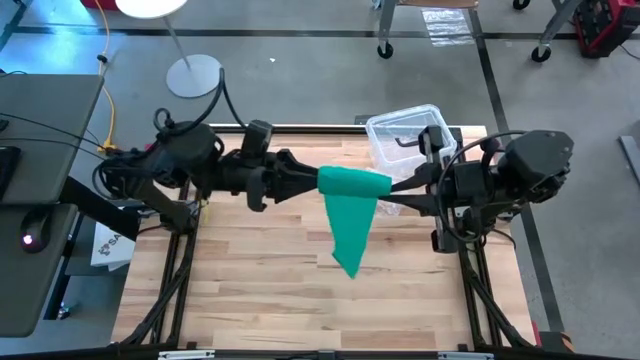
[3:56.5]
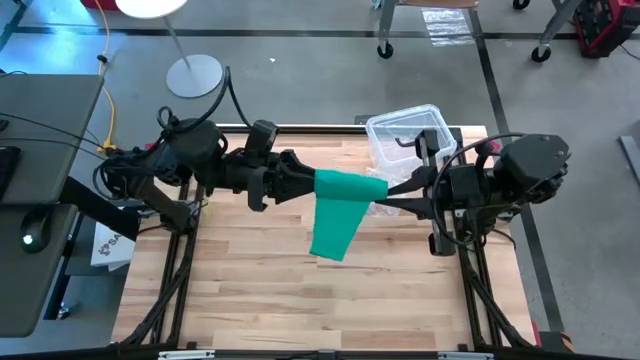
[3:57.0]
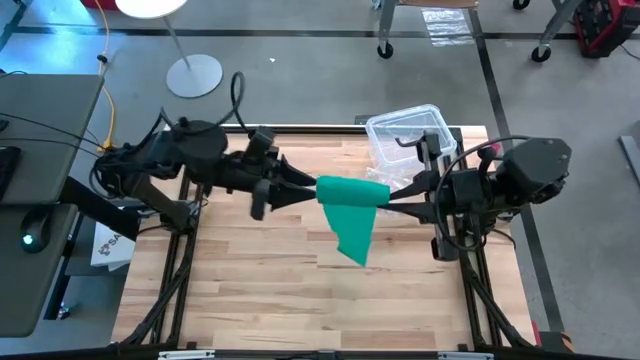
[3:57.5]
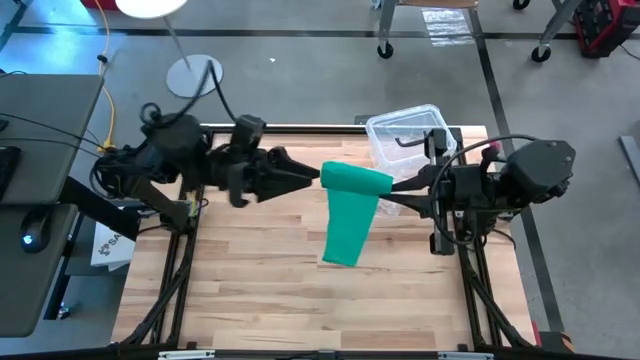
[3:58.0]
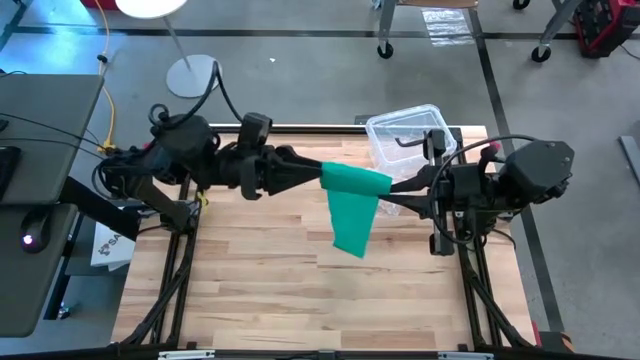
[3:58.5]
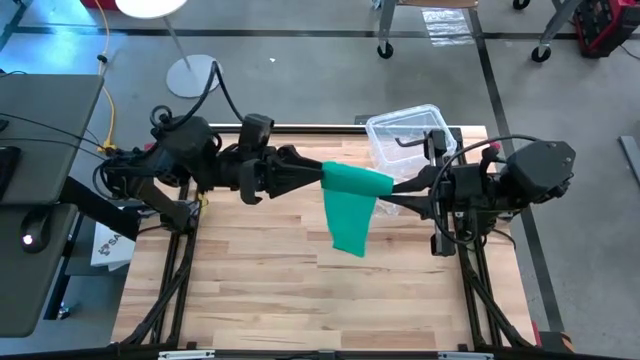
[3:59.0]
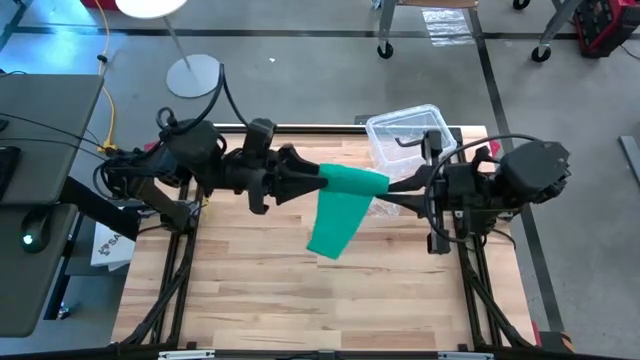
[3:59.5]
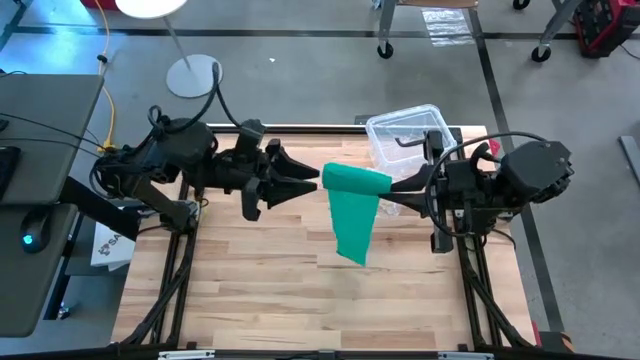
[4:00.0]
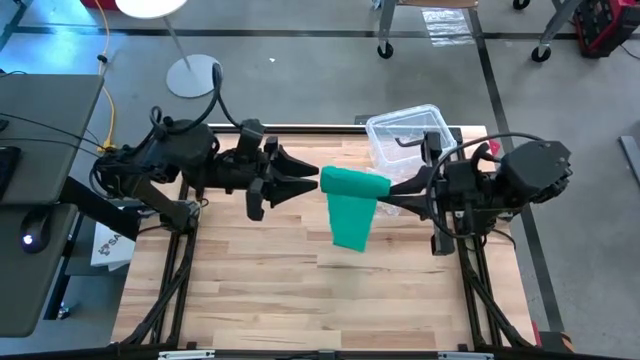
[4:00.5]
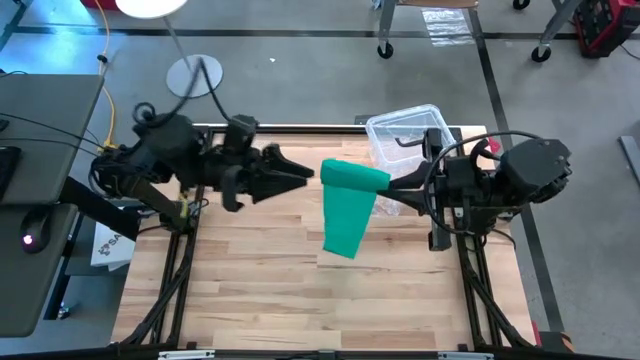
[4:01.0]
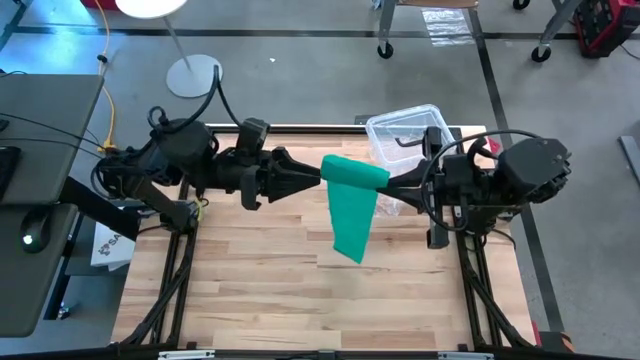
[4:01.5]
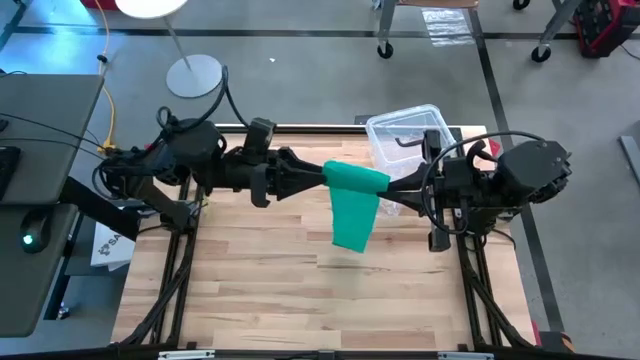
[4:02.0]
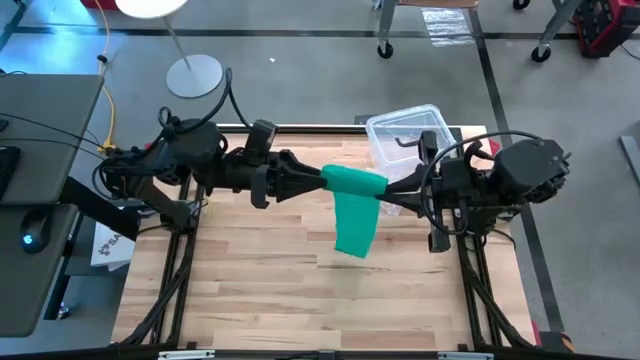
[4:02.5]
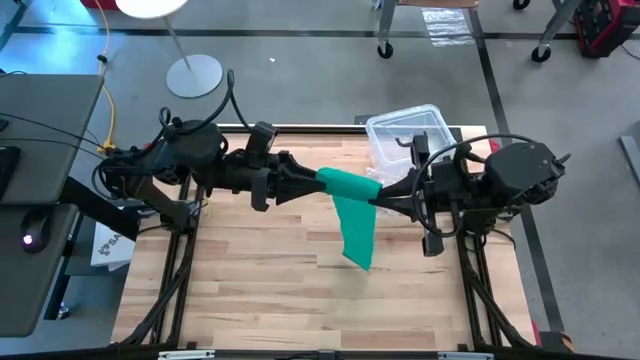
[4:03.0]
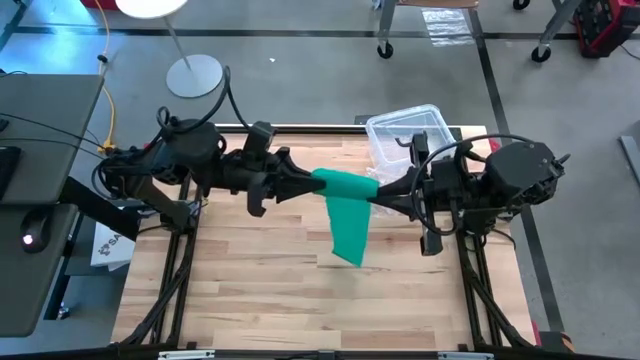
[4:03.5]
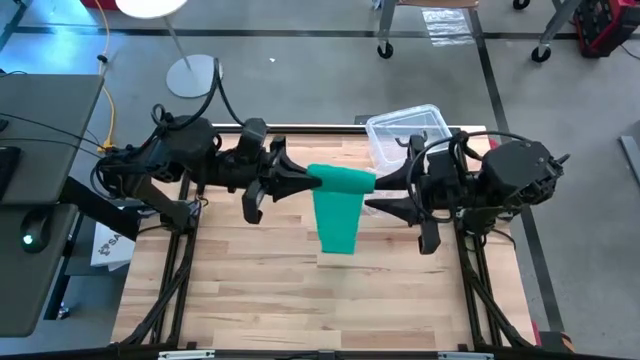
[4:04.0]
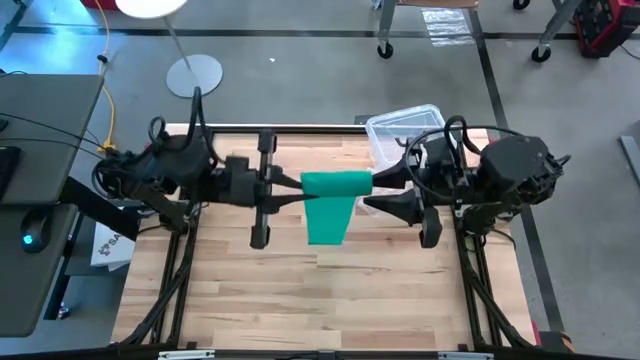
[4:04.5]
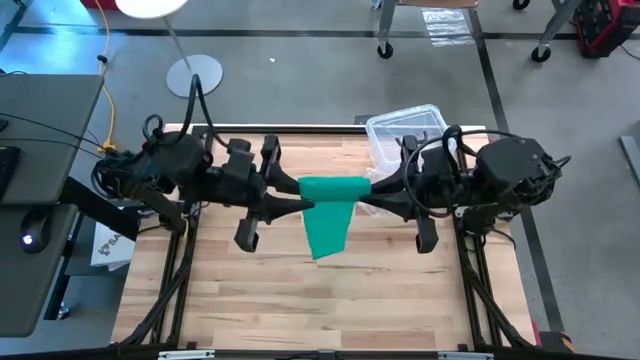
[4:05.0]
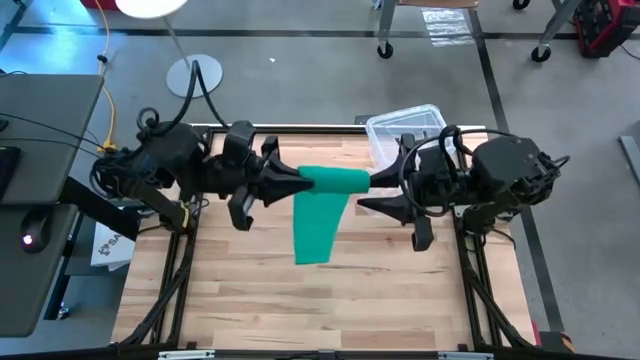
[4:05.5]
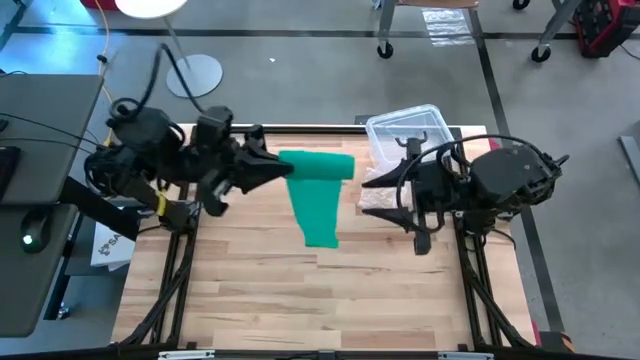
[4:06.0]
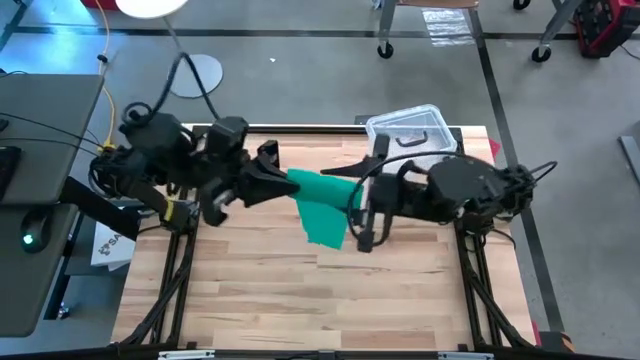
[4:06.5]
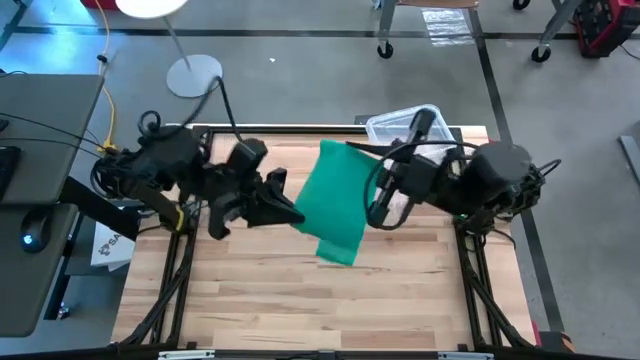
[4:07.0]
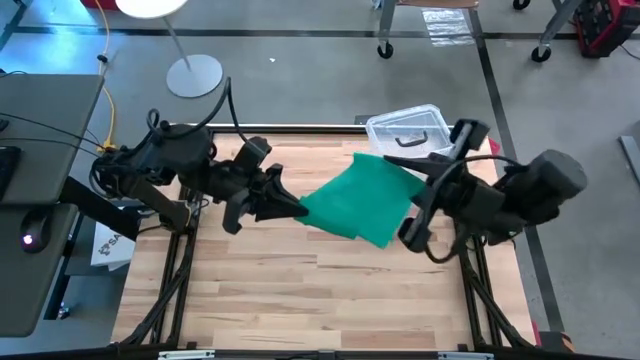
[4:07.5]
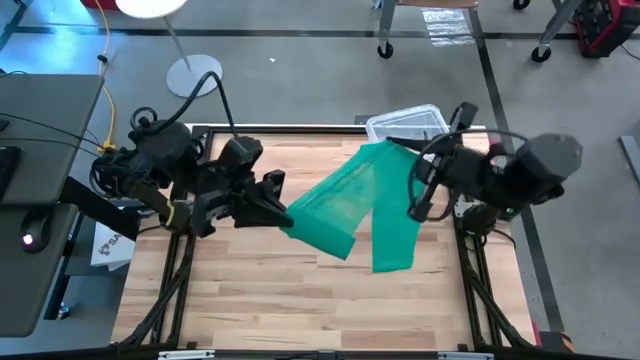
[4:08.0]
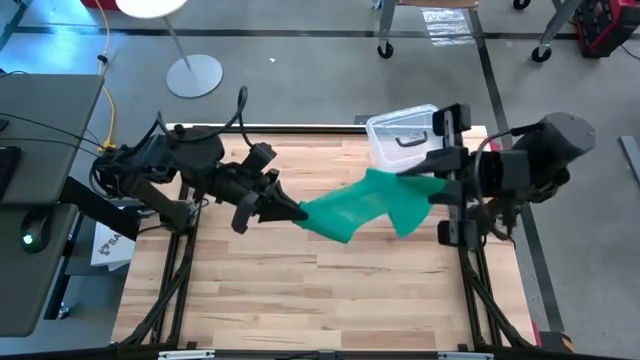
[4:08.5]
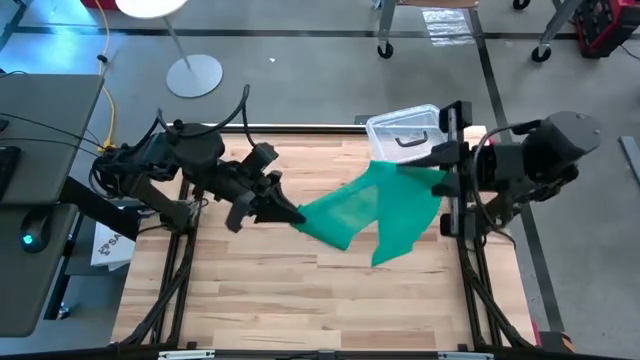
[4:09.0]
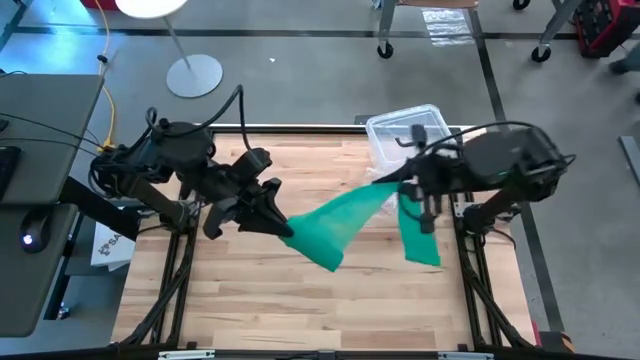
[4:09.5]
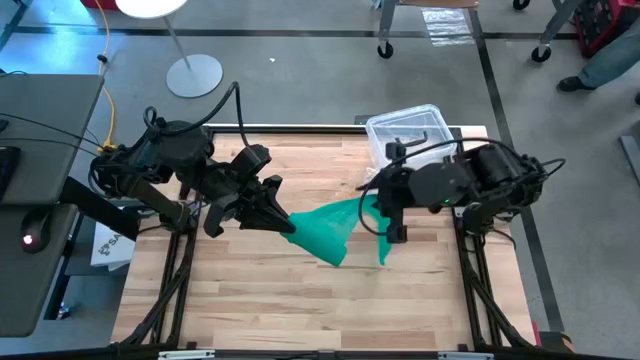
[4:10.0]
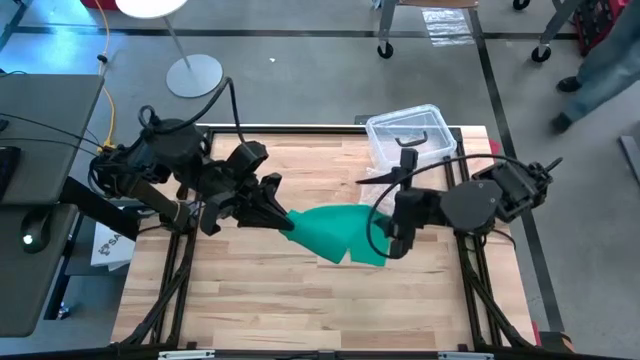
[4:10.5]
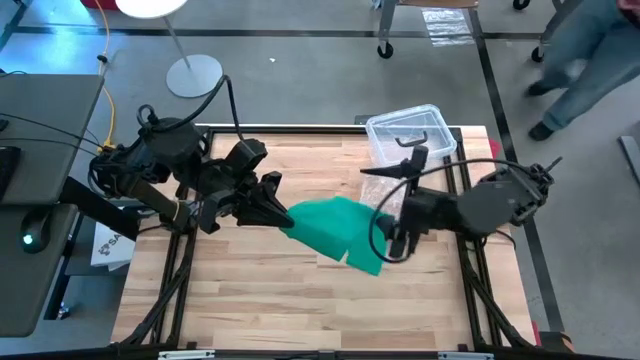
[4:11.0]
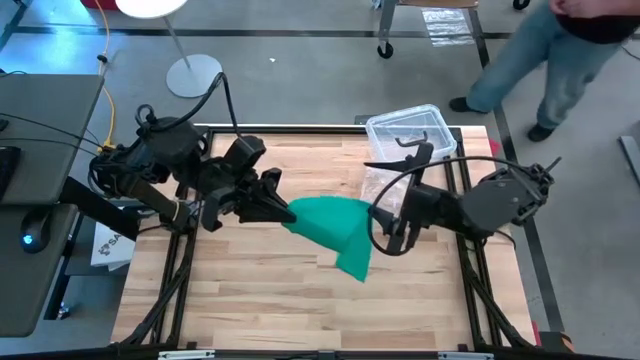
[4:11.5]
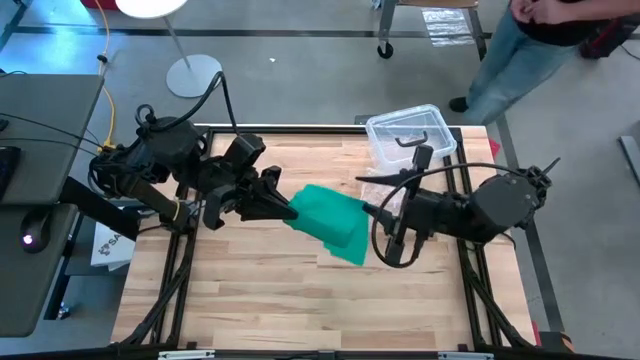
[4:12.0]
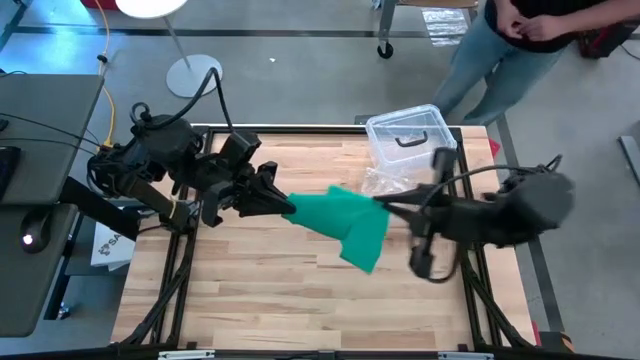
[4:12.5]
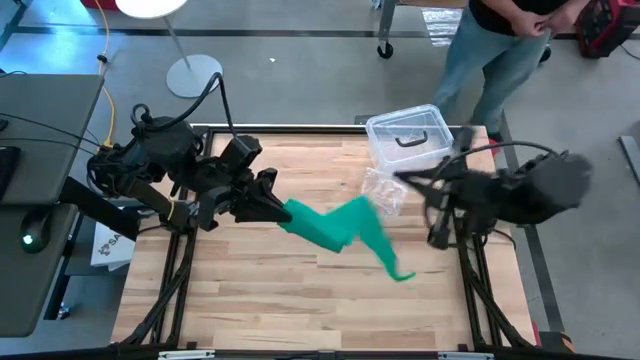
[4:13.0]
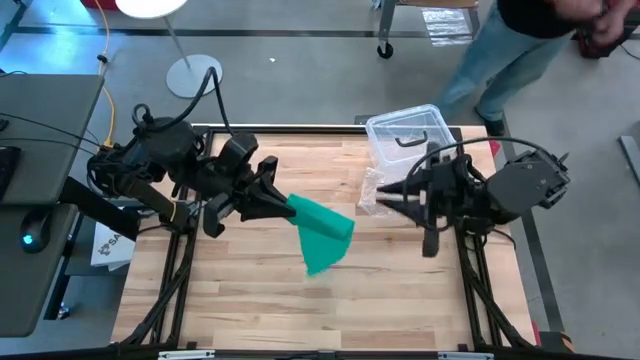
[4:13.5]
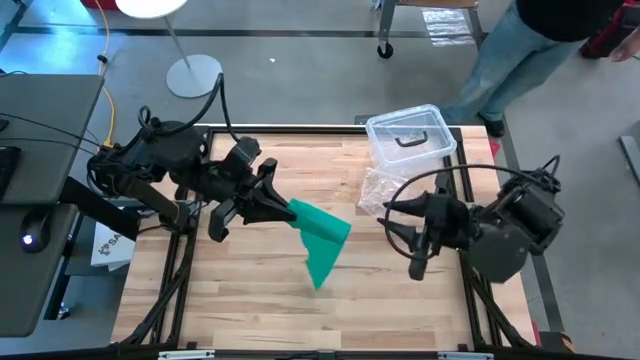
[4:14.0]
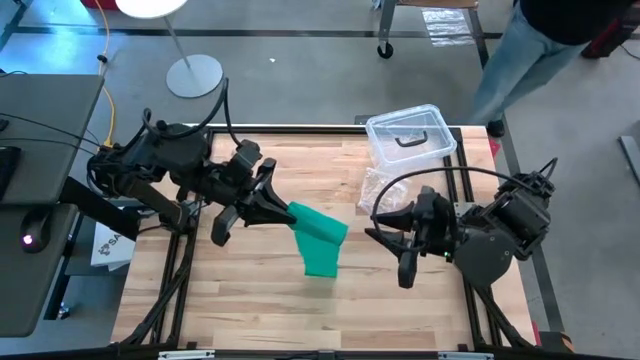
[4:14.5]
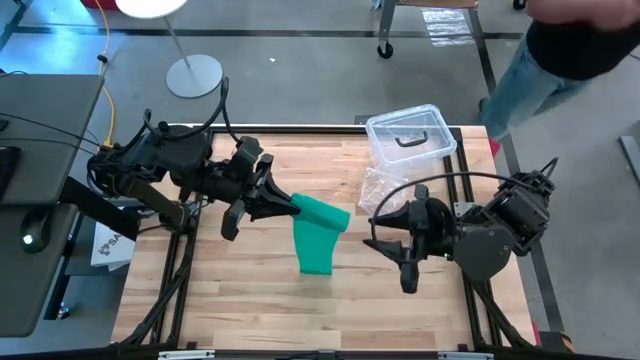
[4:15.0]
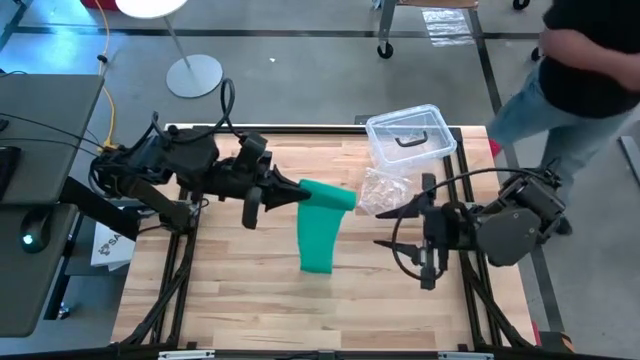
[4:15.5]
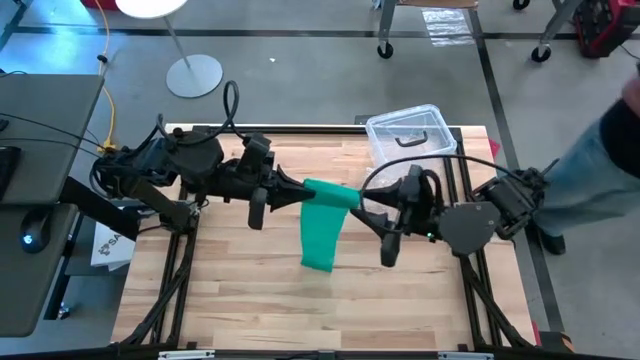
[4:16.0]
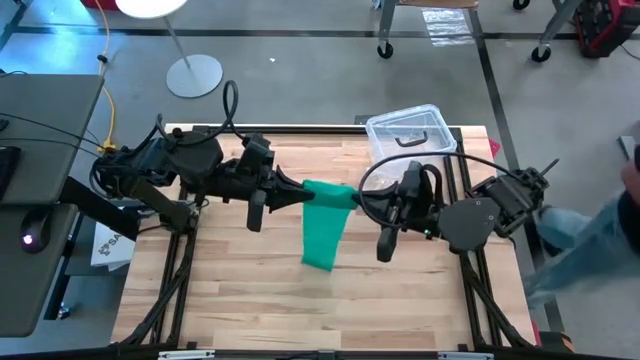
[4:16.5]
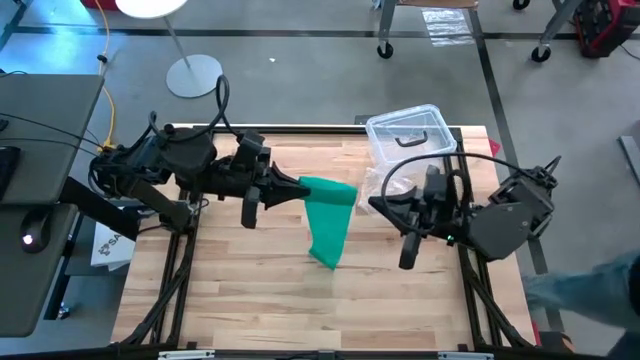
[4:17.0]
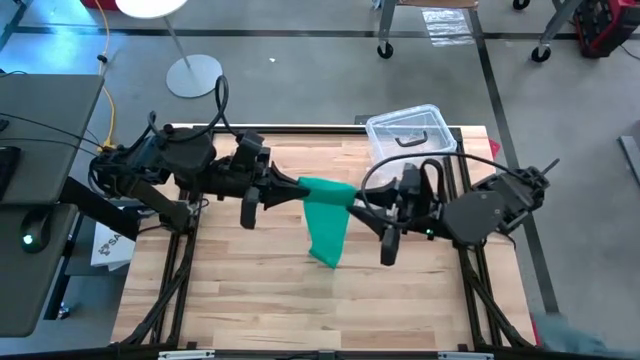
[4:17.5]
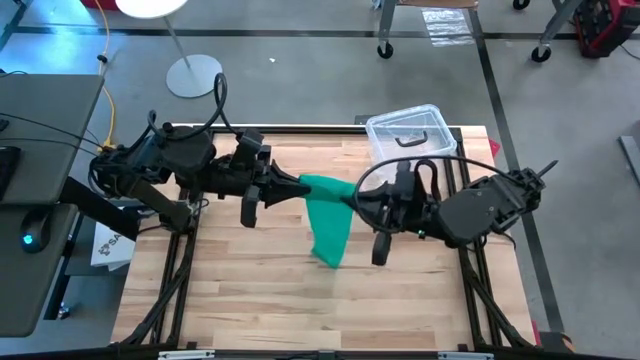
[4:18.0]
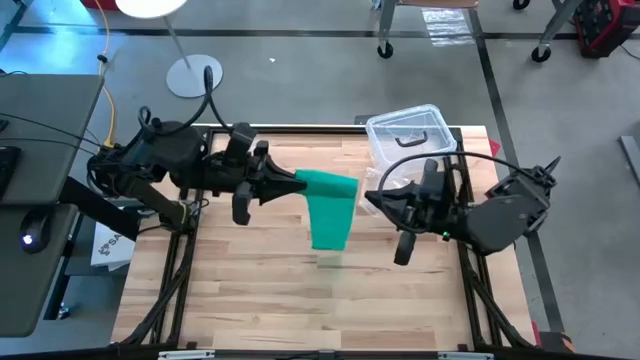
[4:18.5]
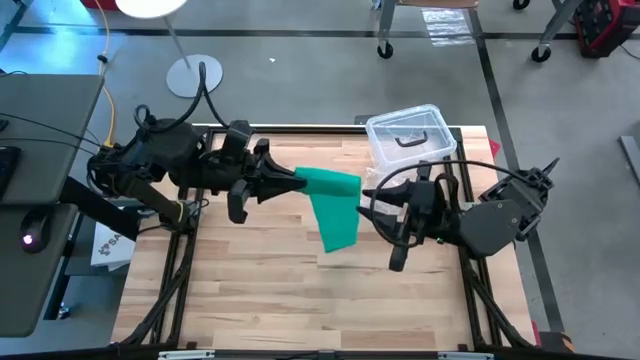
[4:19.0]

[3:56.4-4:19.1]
Task: Roll bandage
Roll the green bandage
